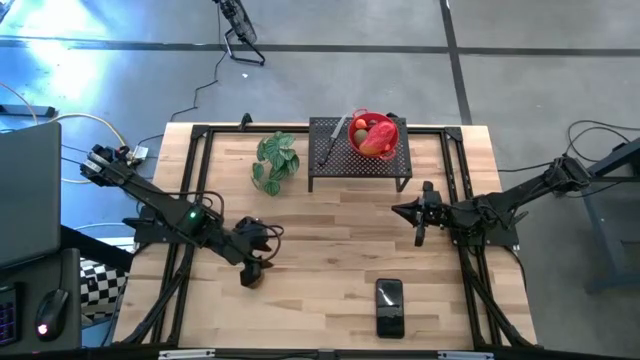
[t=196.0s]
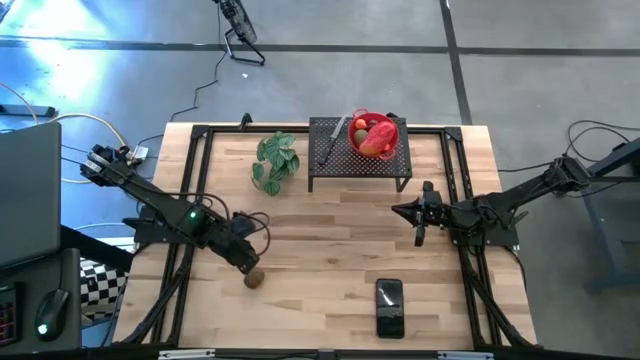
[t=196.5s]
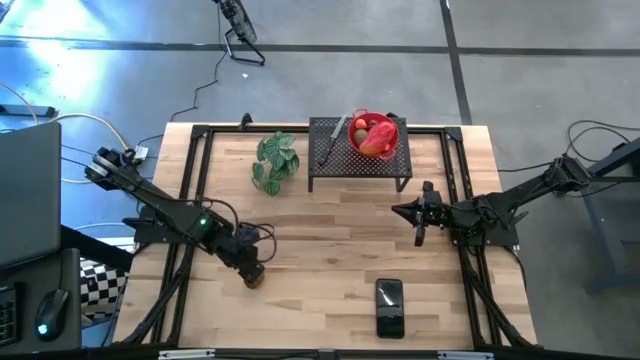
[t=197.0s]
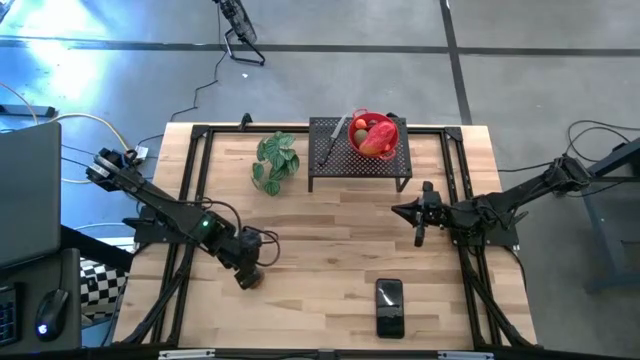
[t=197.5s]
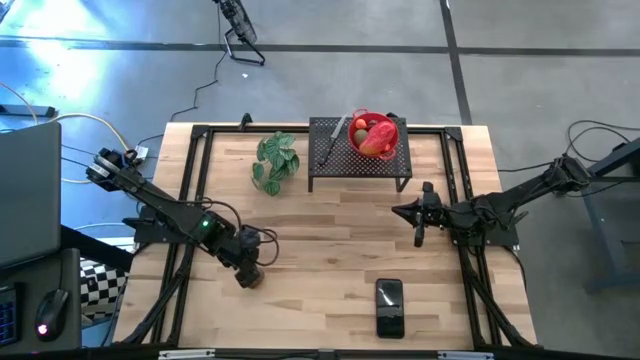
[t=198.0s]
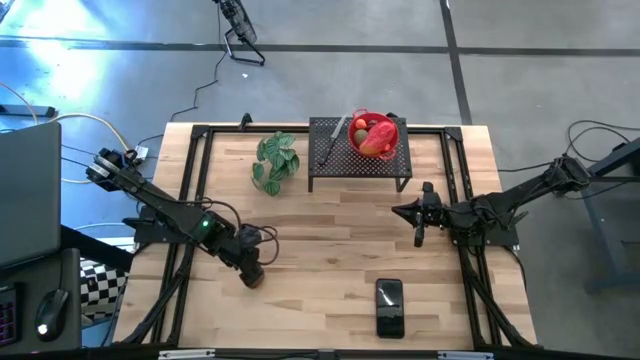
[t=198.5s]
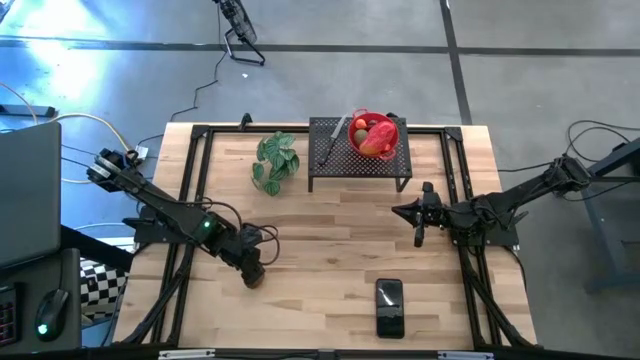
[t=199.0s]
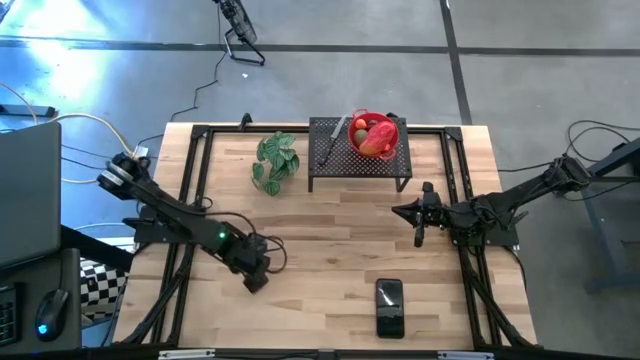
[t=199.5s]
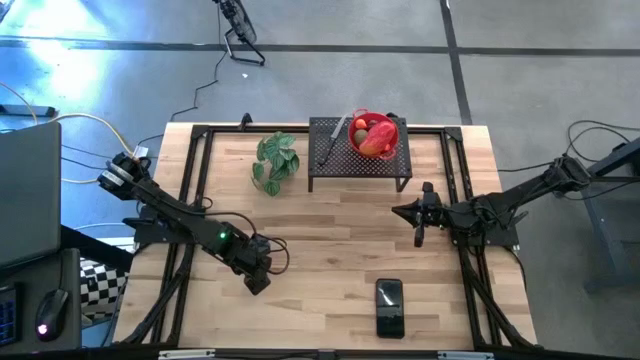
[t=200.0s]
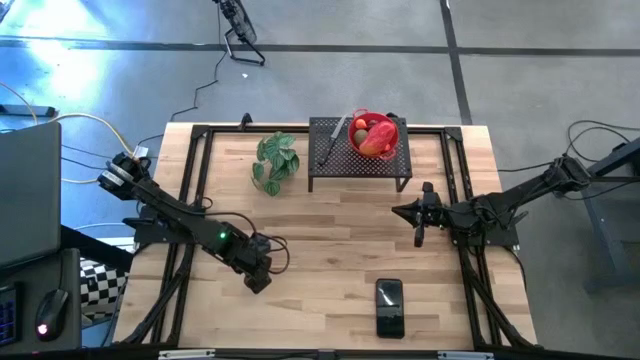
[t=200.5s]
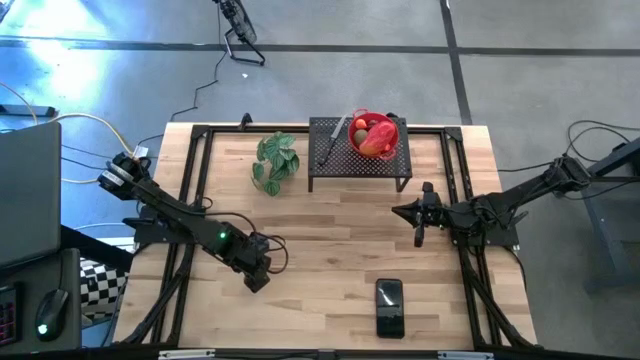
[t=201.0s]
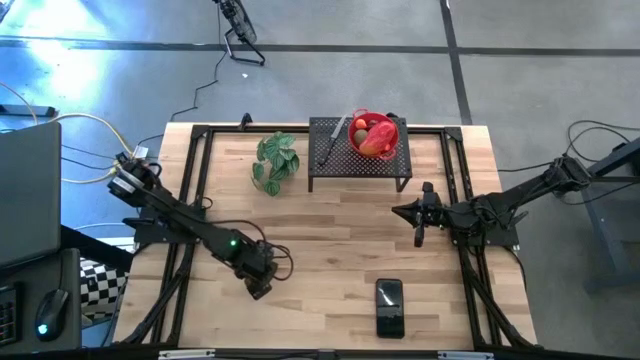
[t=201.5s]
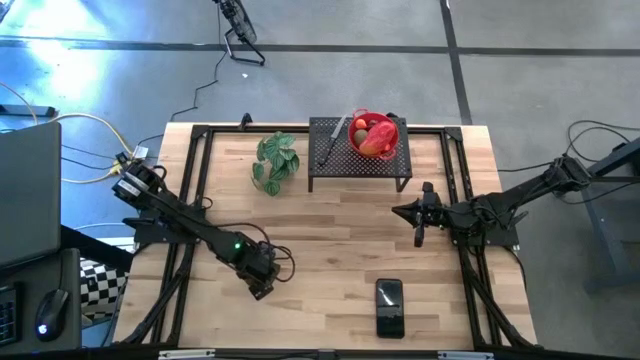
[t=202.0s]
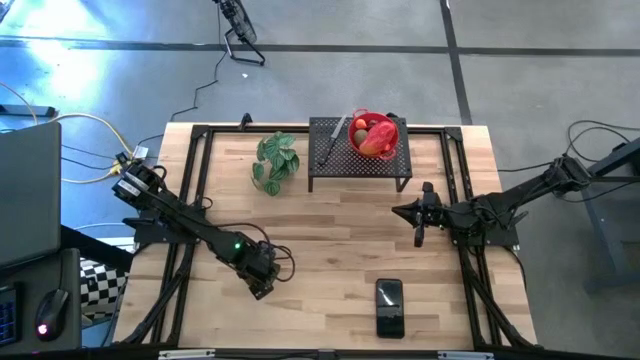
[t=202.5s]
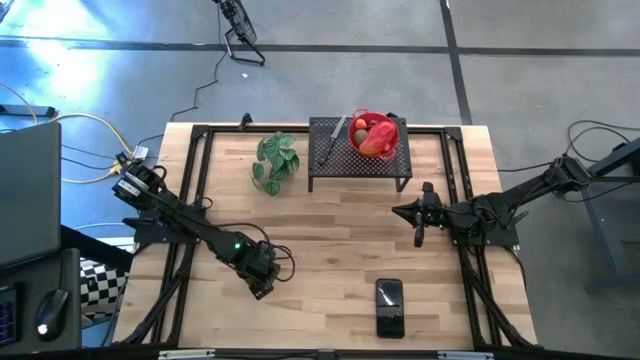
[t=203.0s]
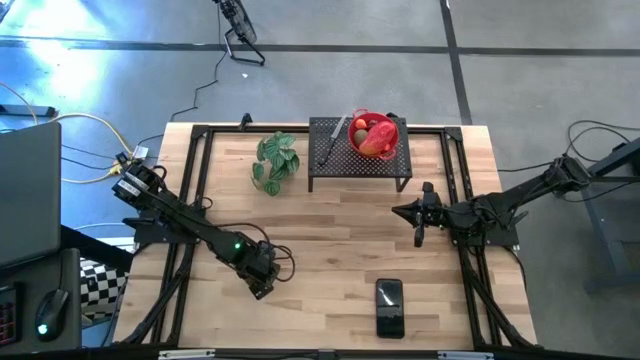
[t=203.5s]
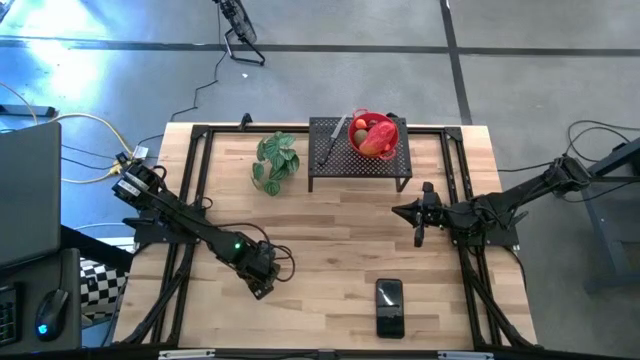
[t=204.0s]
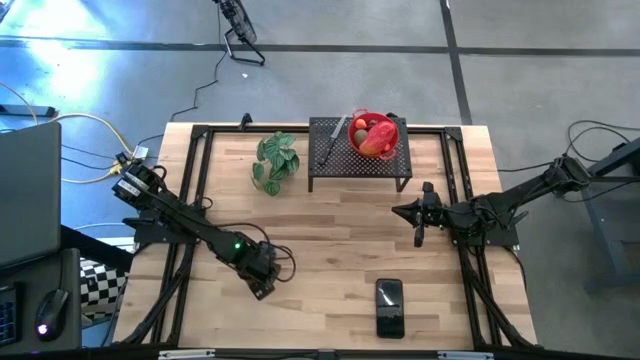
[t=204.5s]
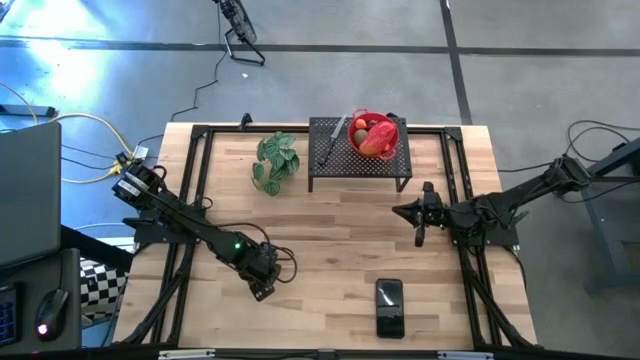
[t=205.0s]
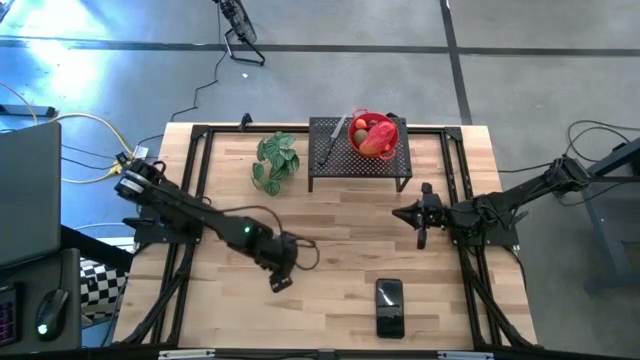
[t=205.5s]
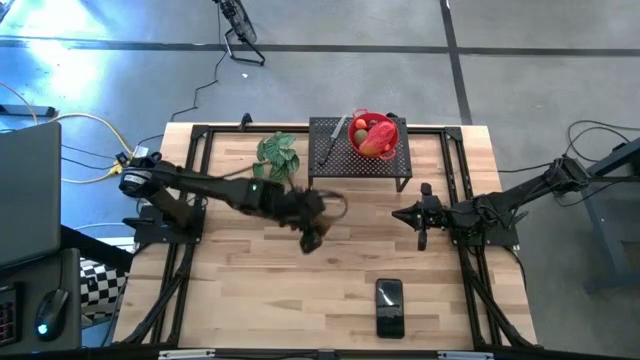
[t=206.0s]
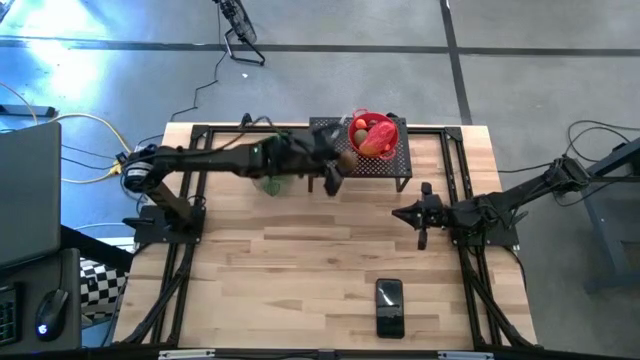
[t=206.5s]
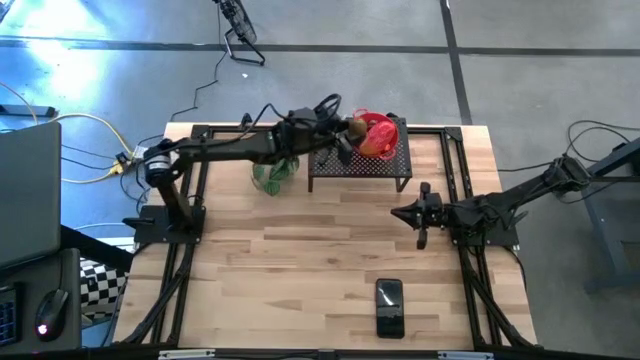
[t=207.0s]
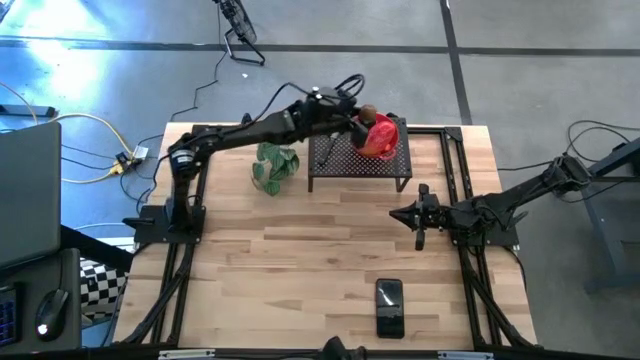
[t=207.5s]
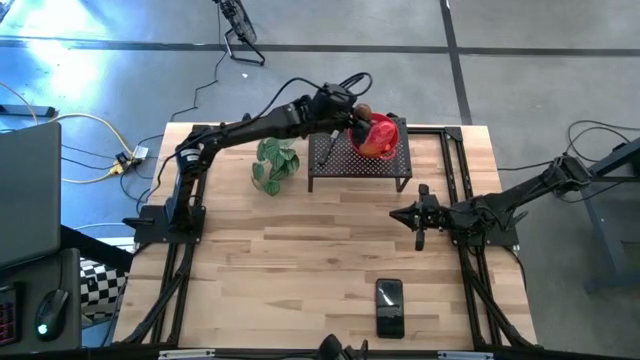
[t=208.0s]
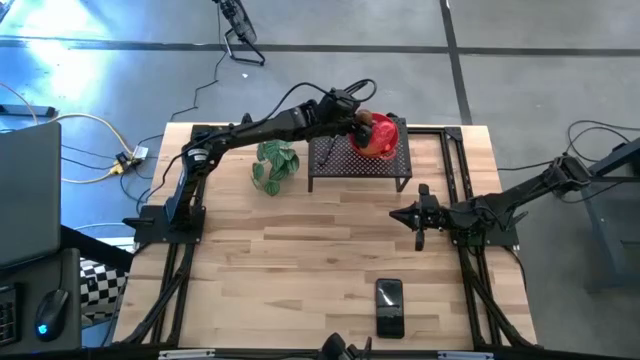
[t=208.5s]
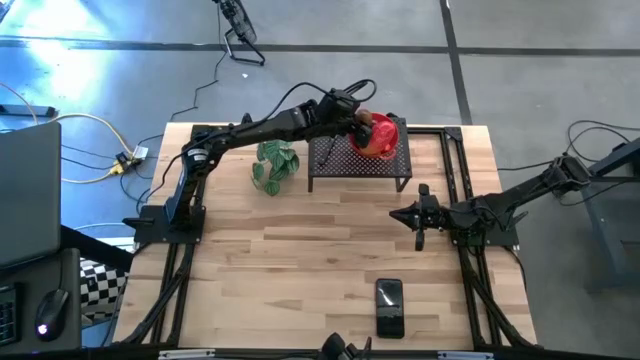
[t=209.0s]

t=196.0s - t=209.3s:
Task: Pick & Place Fruit
Put the brown kiwi into the red strainer bowl on the shelf

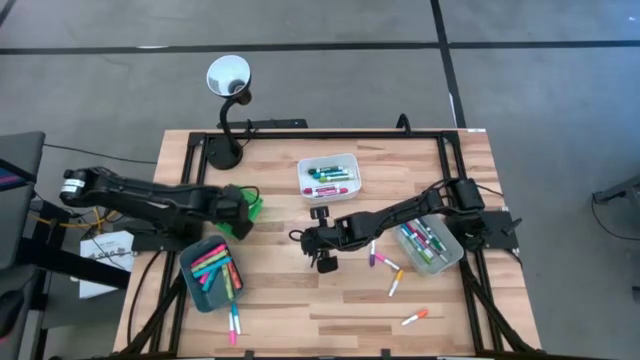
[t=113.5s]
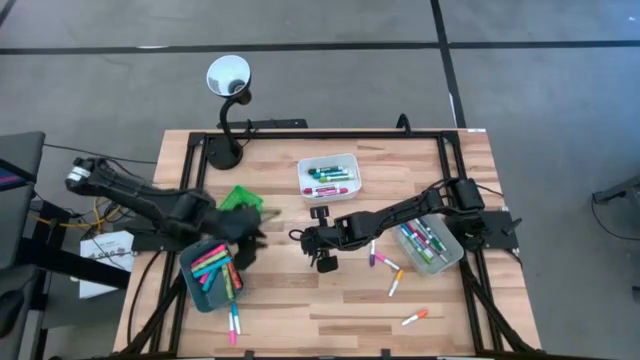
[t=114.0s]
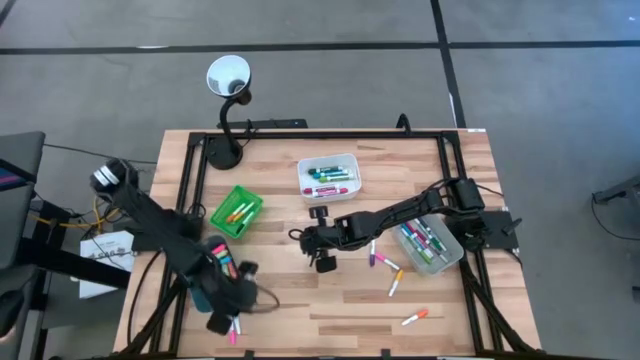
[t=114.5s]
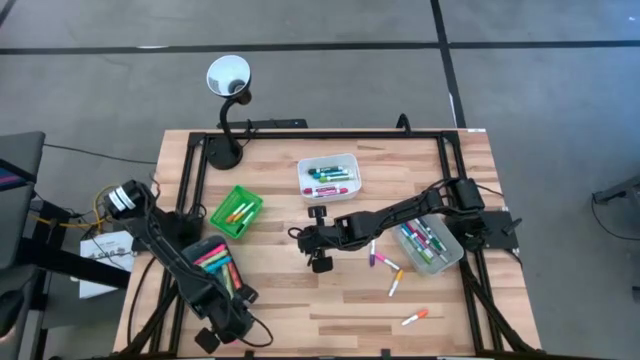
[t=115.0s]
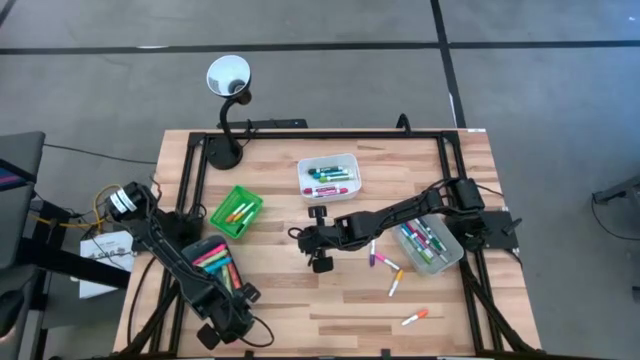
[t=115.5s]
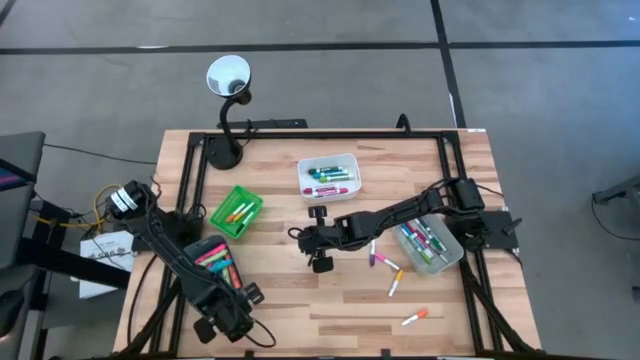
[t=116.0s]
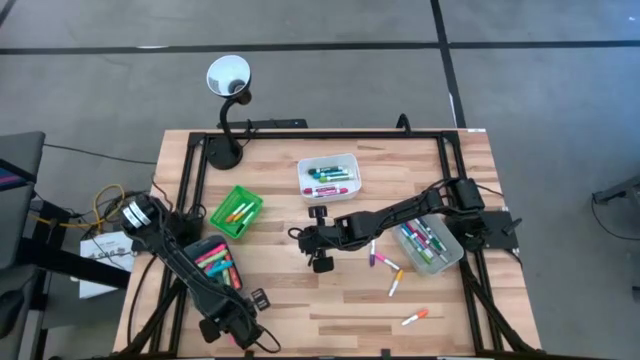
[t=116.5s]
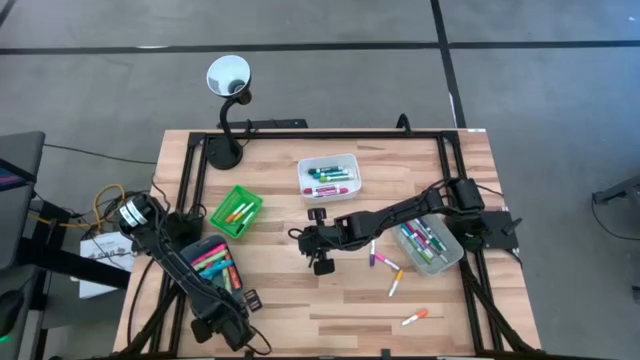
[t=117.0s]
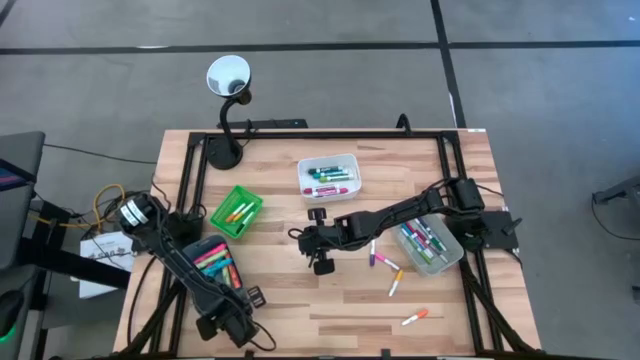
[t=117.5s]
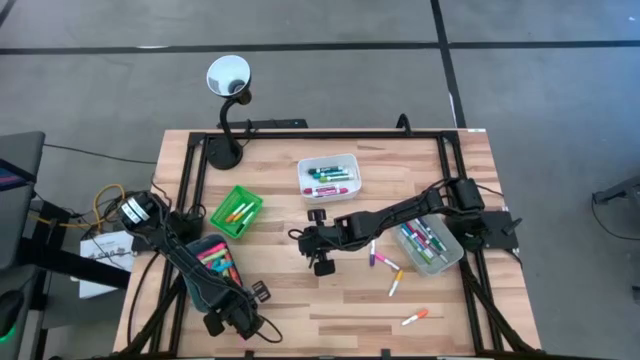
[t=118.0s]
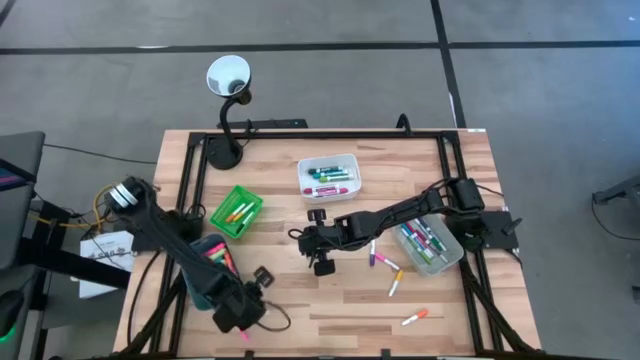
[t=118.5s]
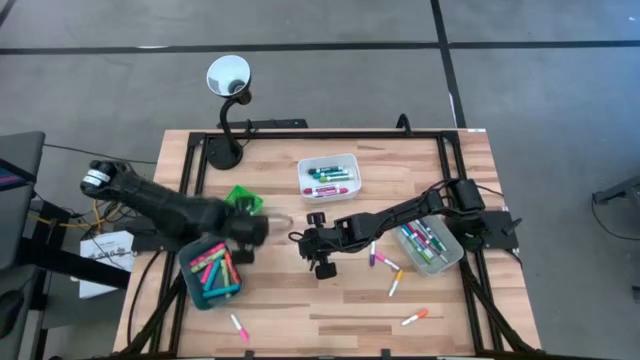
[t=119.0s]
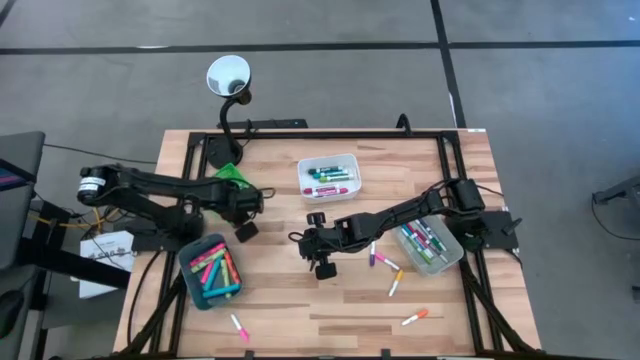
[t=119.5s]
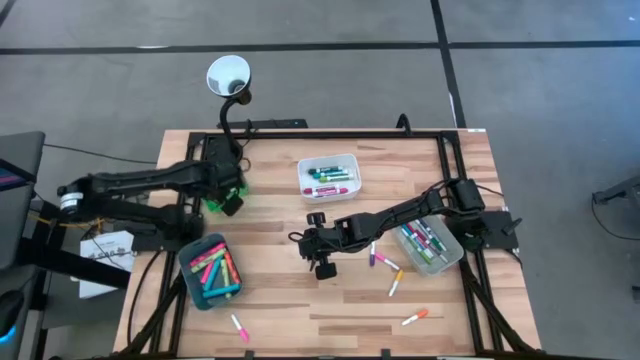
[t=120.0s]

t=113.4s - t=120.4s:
Task: Pick & Place Markers
Put the small light blue highlighter pen into the green bin
